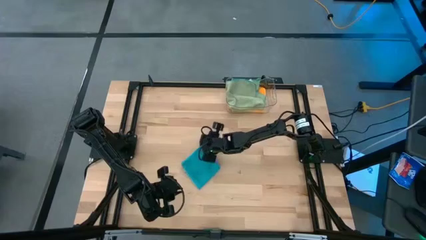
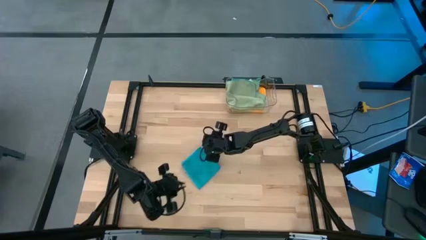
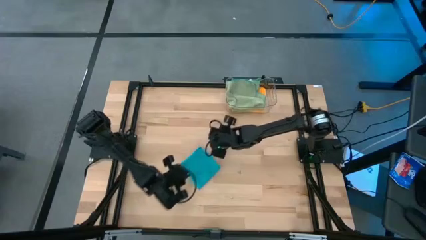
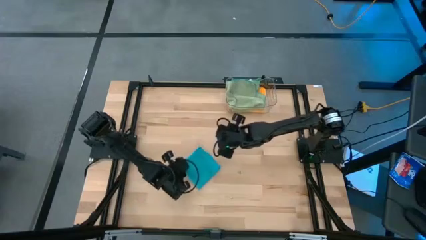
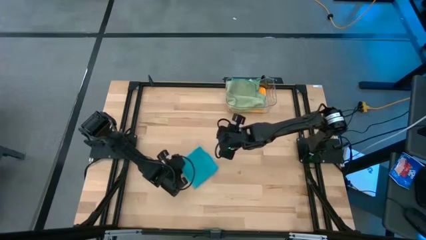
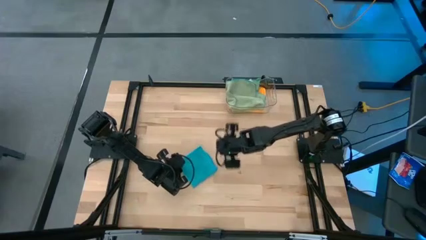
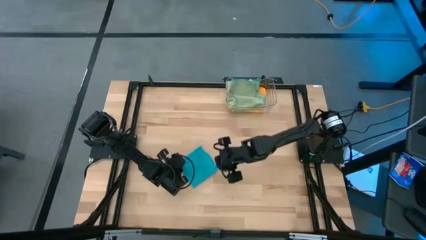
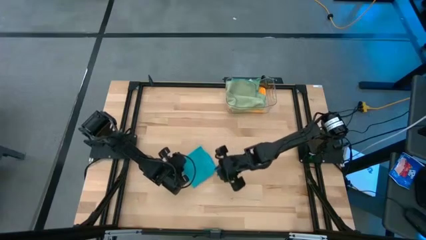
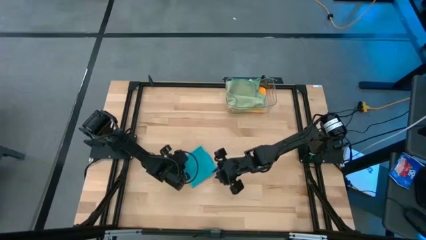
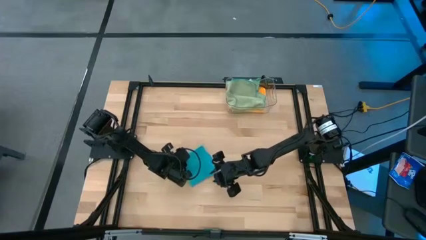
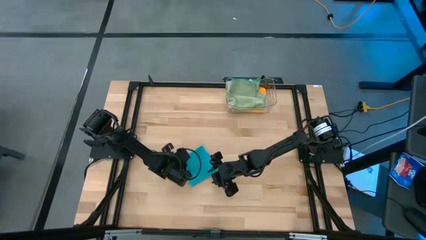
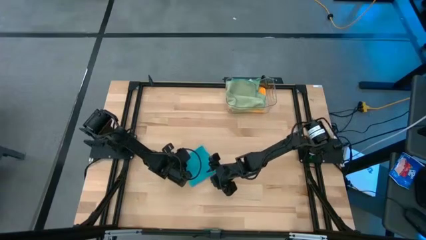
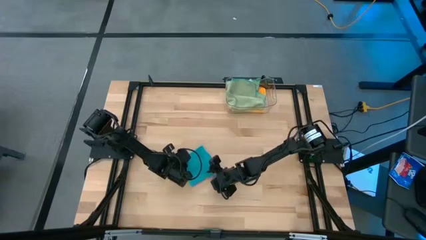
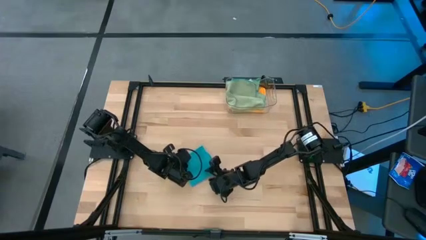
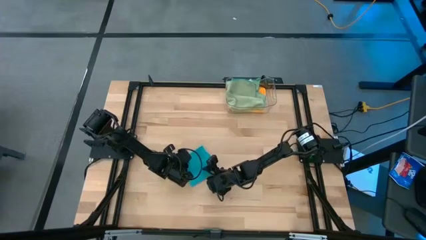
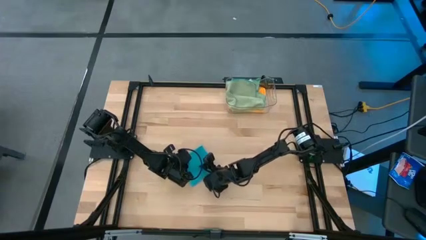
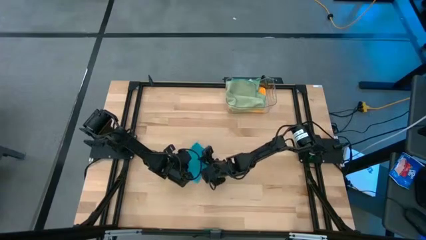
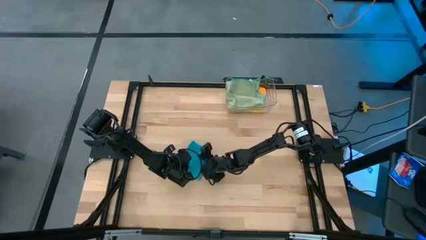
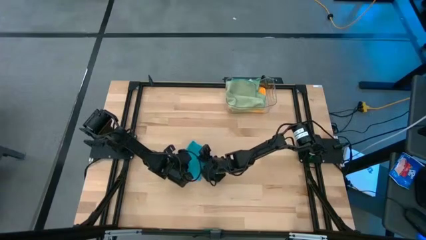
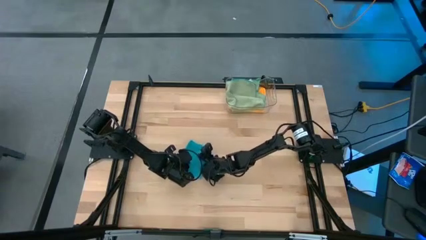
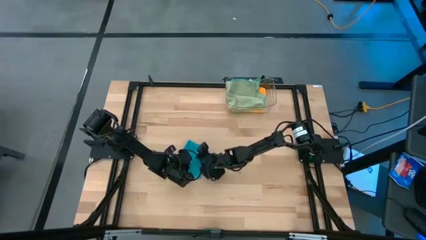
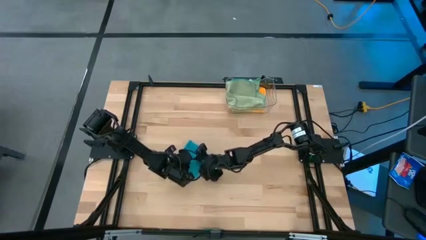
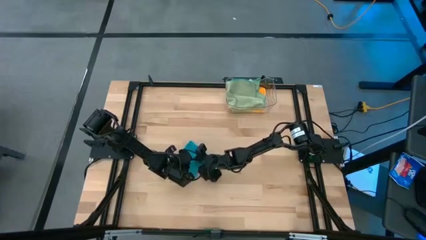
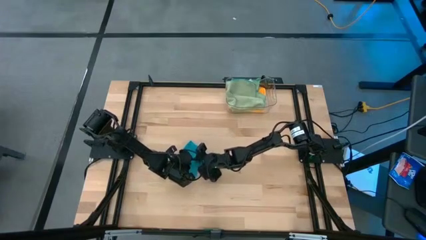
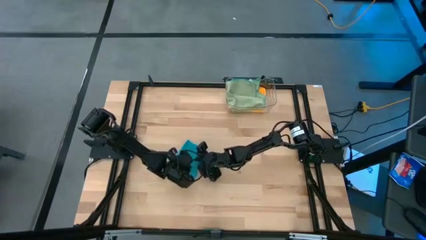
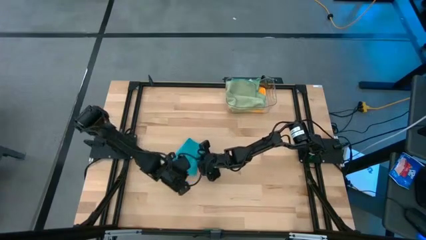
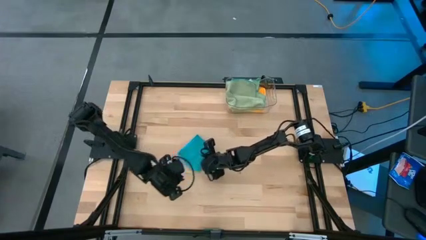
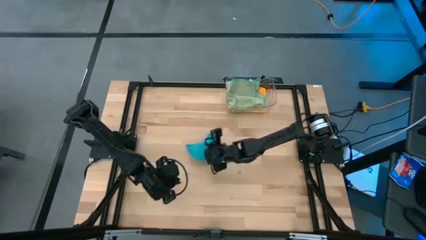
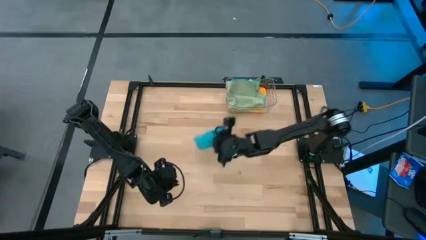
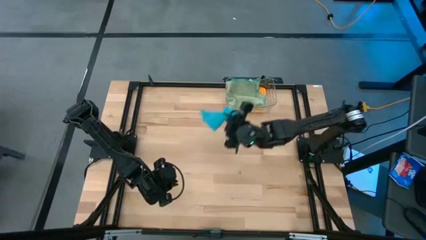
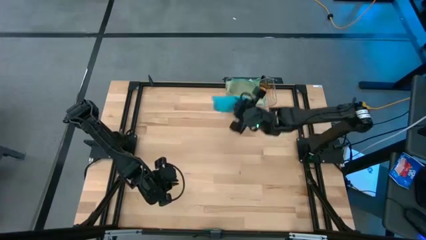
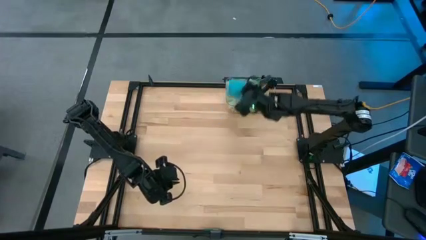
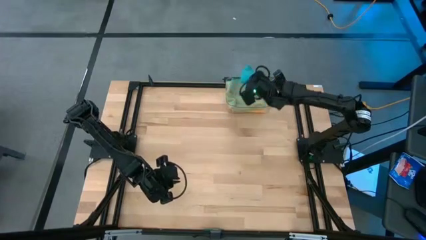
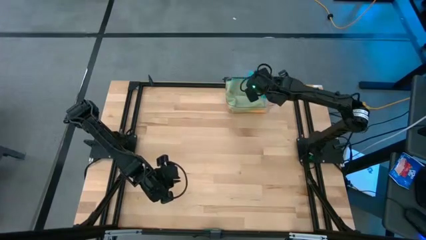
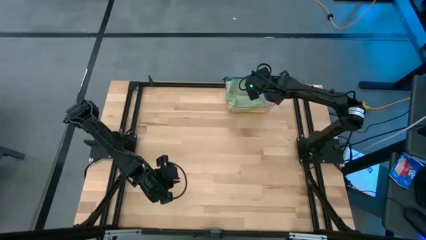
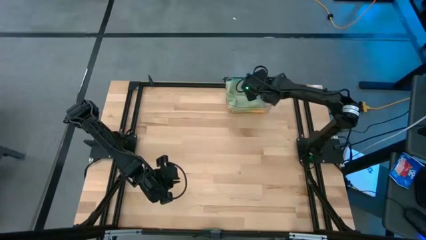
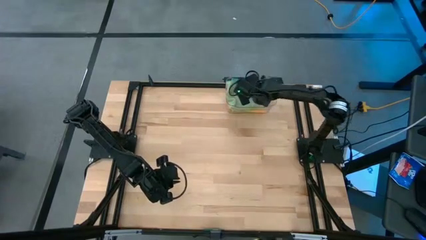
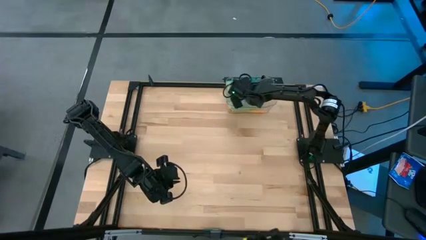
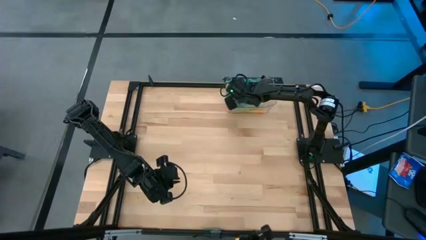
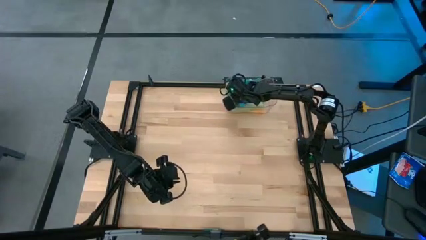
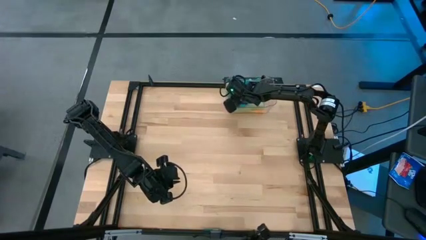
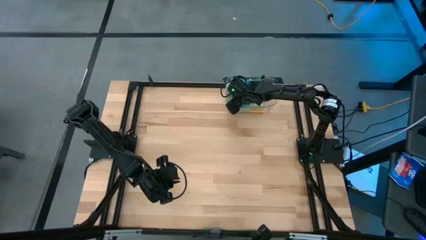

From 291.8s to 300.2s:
Task: Fold microfiber towels
Stack the blue microfiber towel on top of the green microfiber towel in the transparent bin

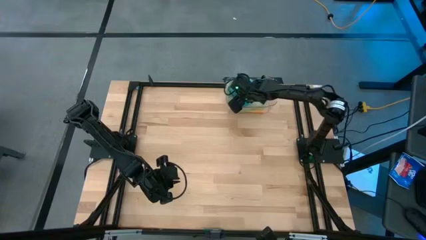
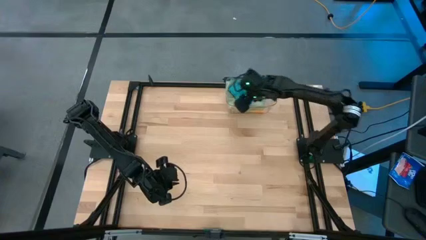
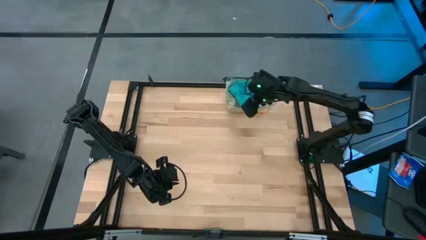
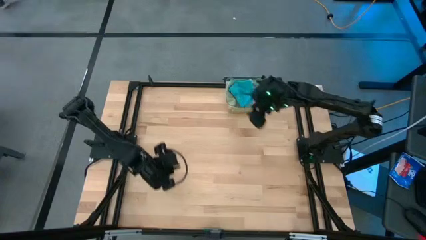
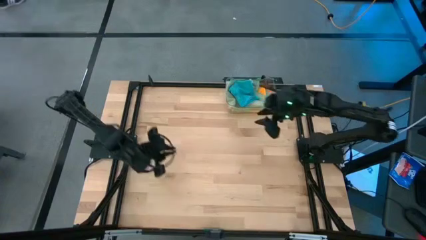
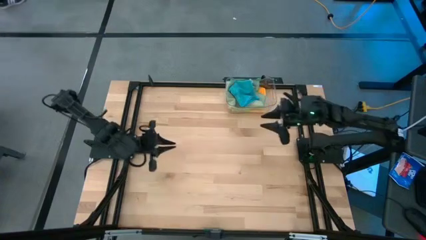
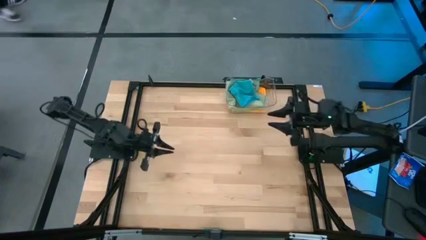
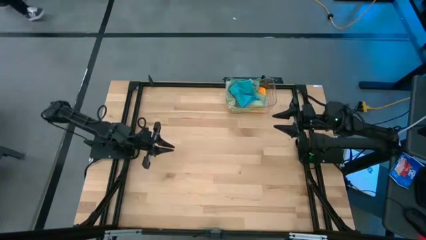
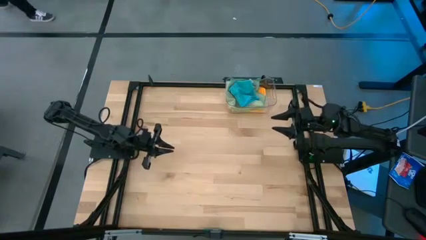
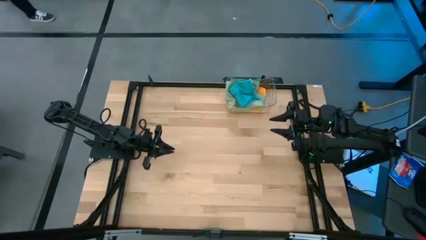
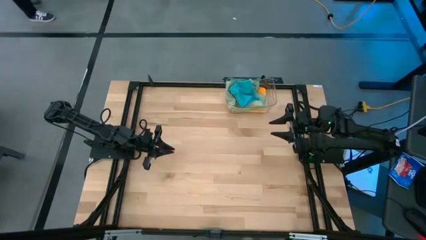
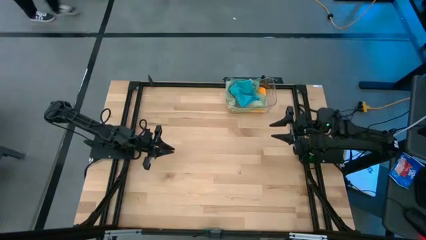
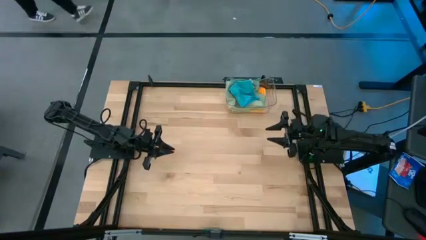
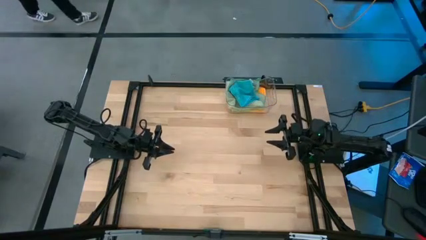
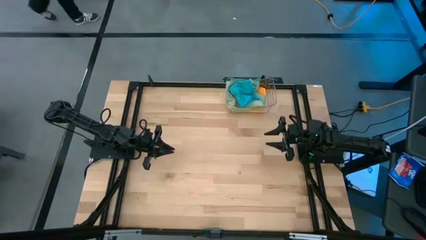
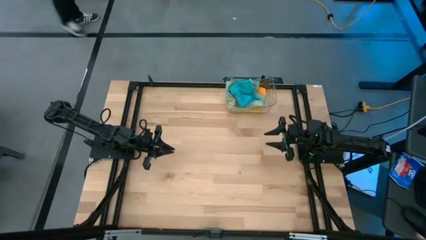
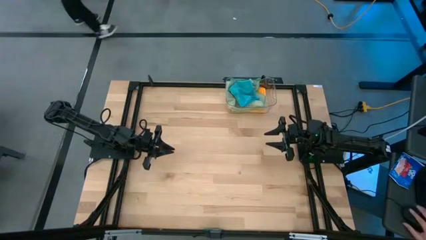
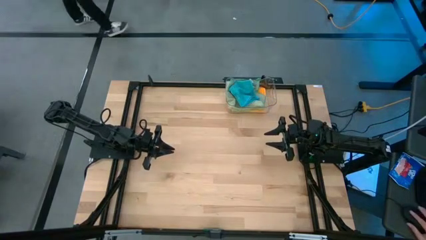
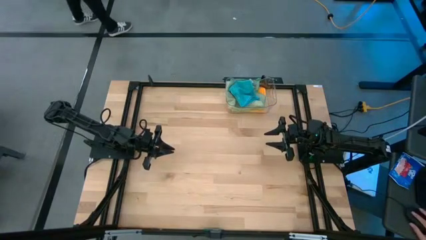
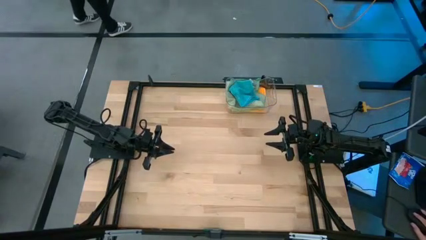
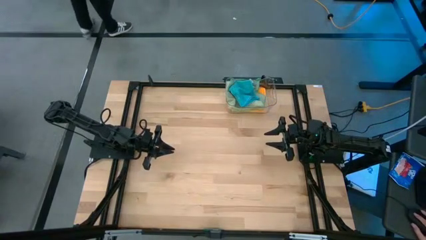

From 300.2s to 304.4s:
Return to Home Position

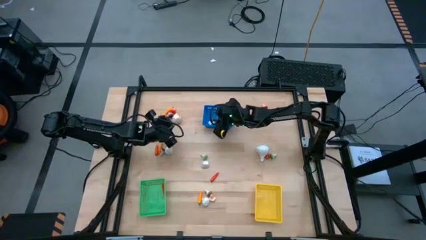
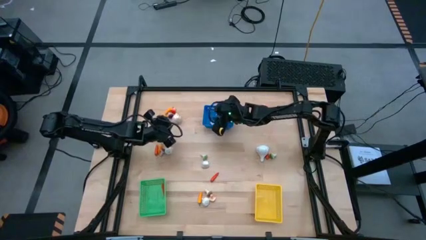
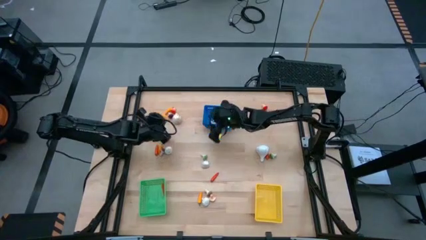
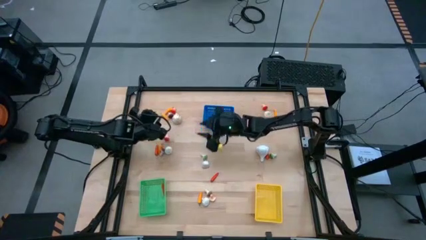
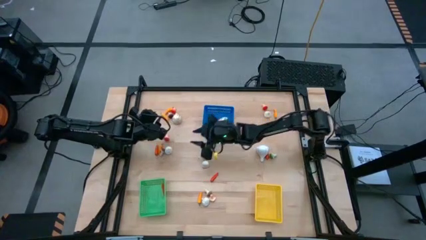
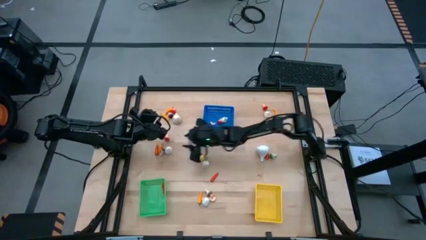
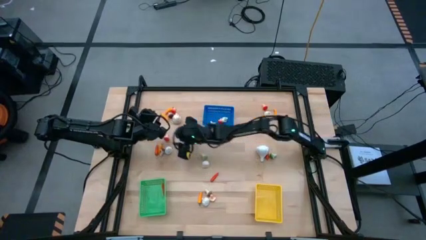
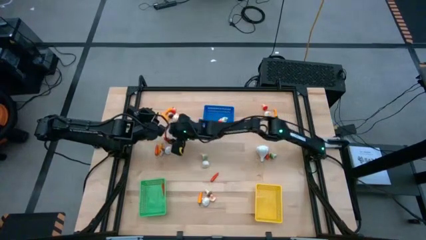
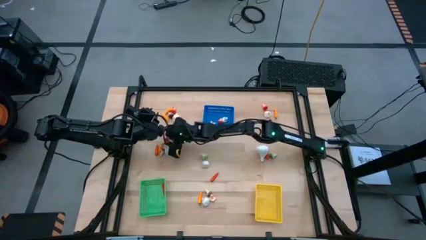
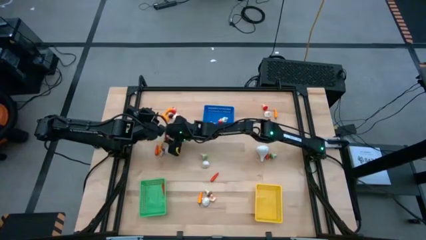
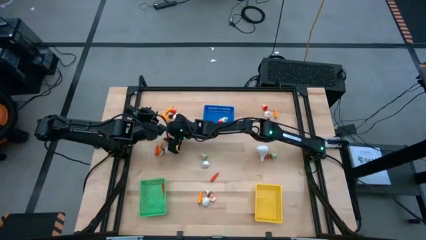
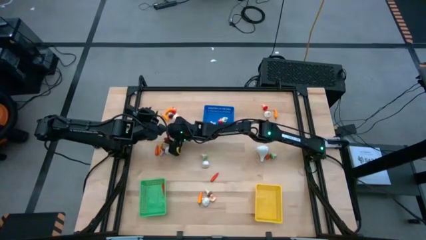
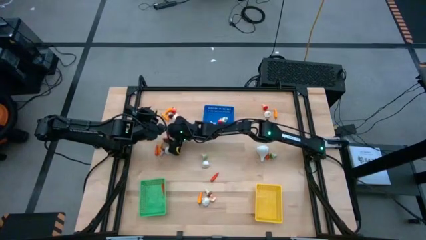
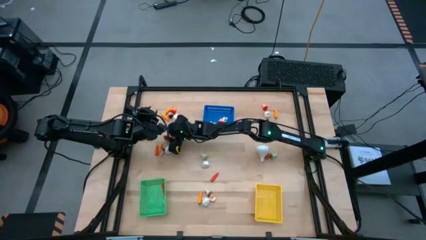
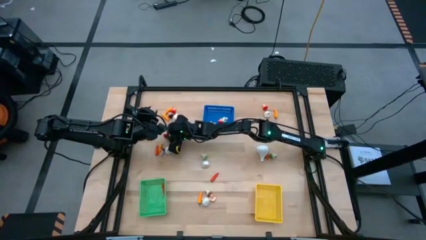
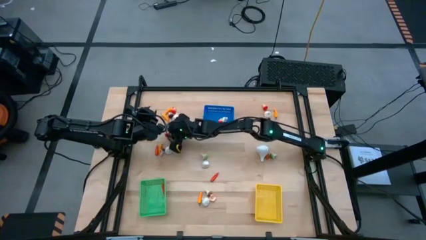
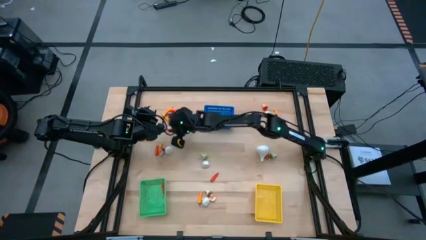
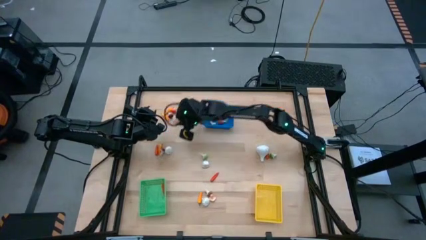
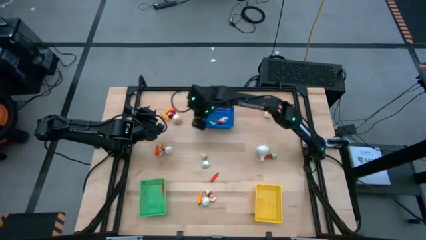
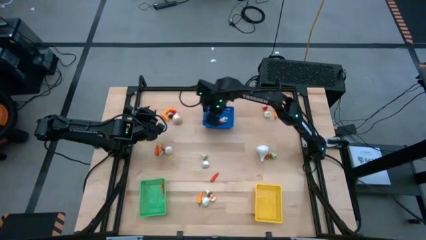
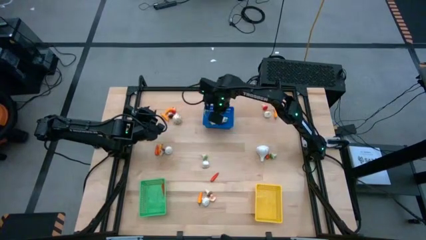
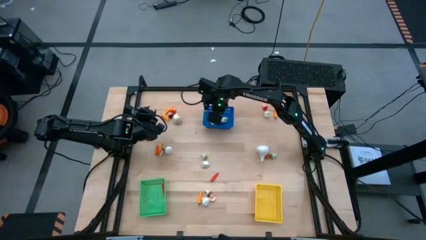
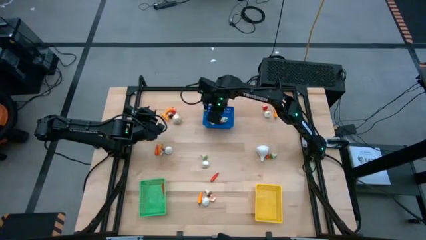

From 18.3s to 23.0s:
Task: Sort produce into baskets
Put the red mushroom into the blue bin
